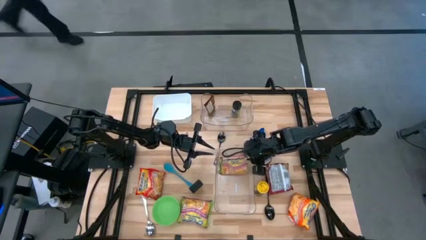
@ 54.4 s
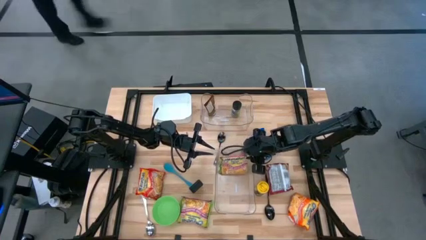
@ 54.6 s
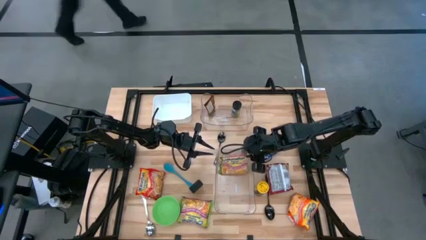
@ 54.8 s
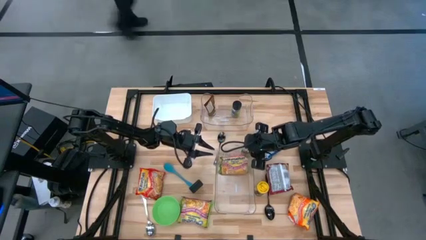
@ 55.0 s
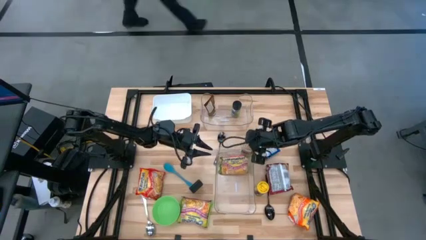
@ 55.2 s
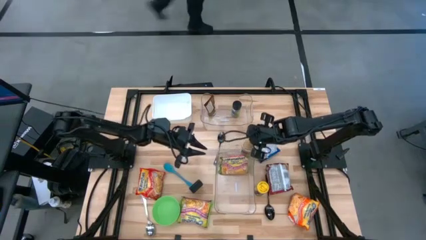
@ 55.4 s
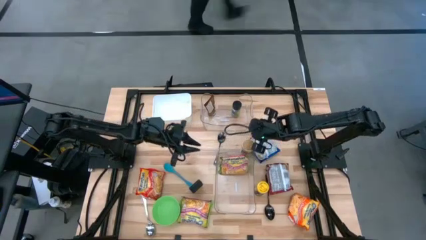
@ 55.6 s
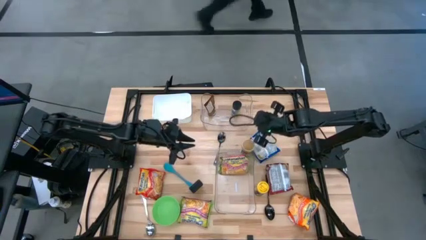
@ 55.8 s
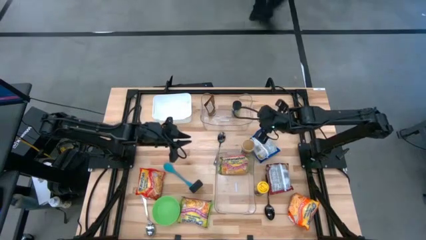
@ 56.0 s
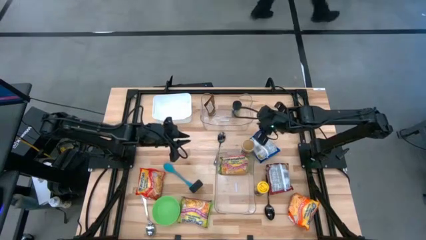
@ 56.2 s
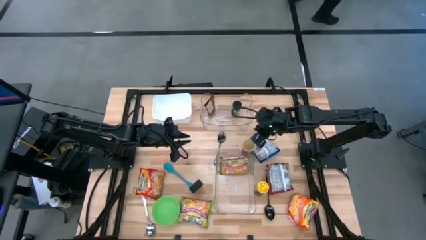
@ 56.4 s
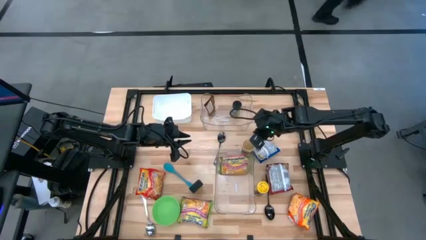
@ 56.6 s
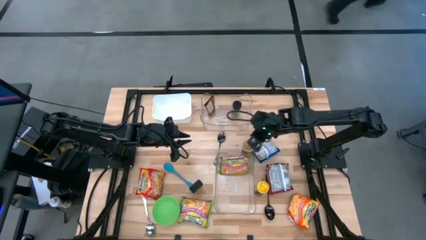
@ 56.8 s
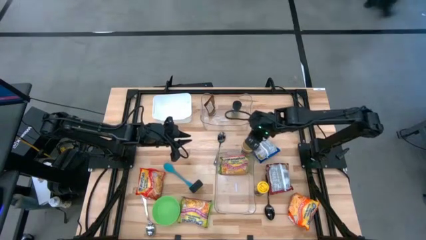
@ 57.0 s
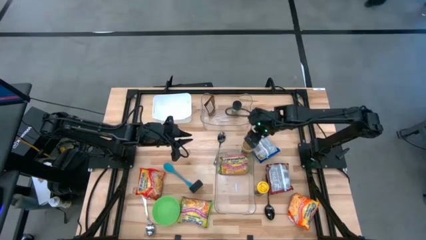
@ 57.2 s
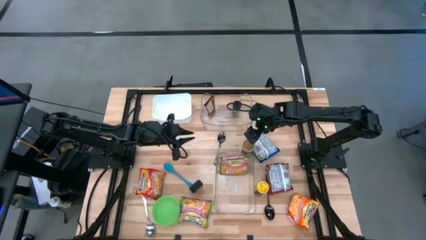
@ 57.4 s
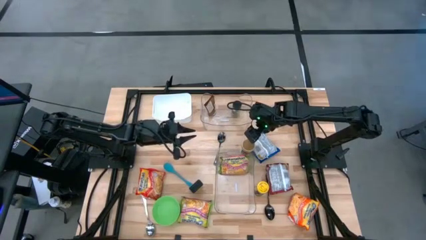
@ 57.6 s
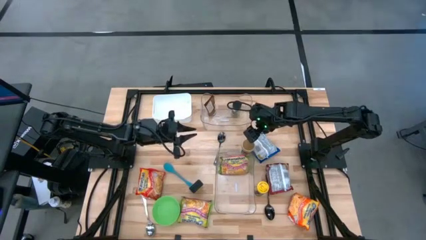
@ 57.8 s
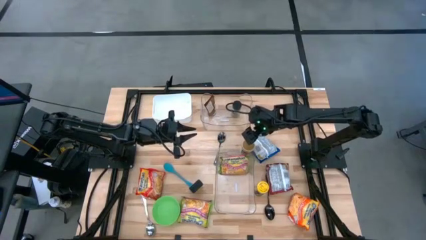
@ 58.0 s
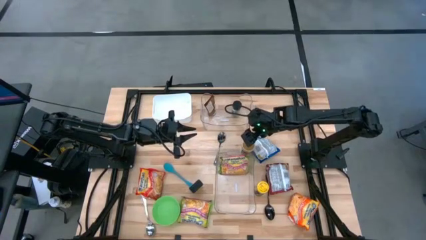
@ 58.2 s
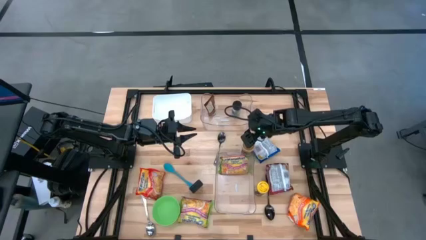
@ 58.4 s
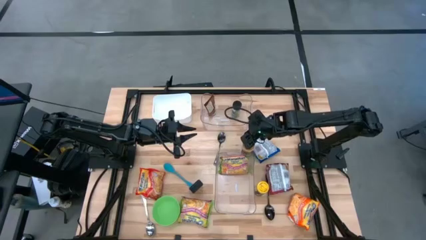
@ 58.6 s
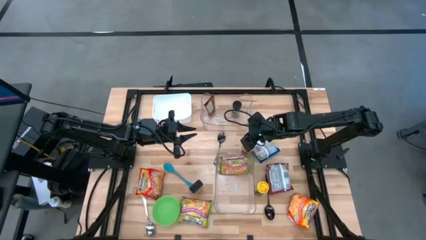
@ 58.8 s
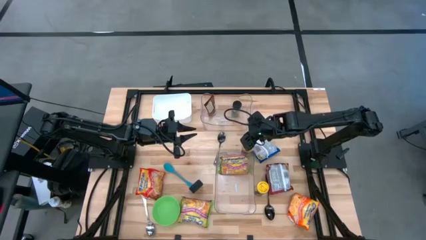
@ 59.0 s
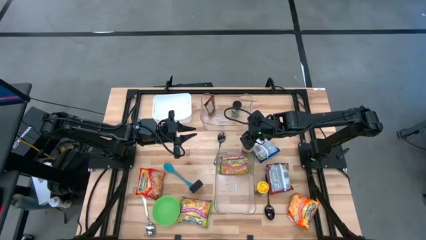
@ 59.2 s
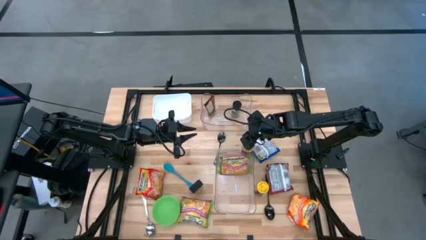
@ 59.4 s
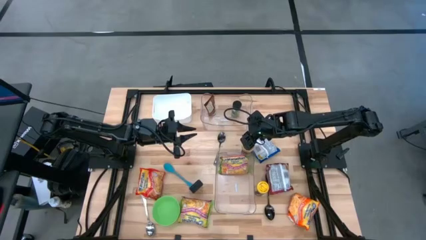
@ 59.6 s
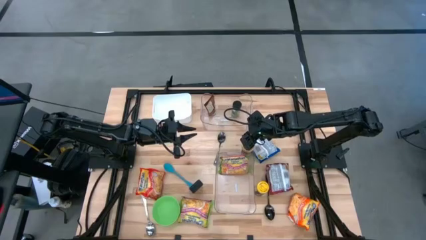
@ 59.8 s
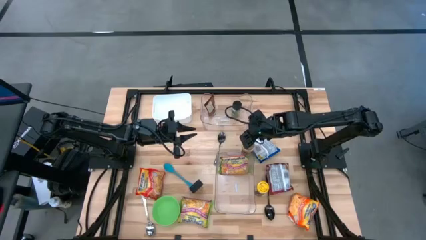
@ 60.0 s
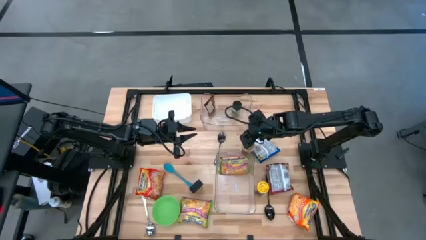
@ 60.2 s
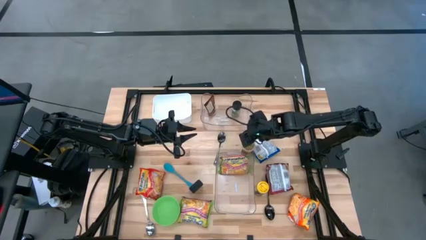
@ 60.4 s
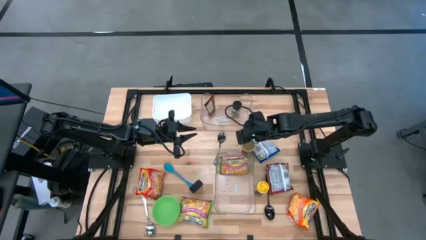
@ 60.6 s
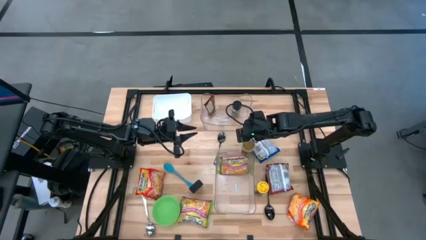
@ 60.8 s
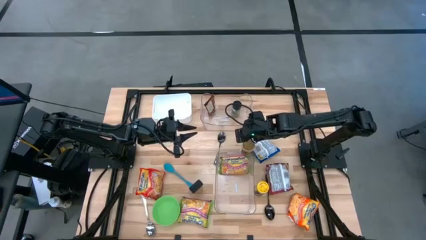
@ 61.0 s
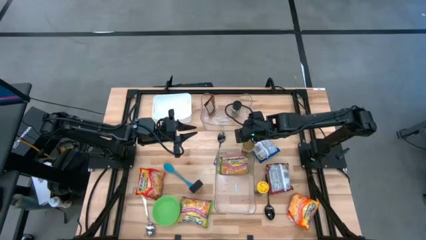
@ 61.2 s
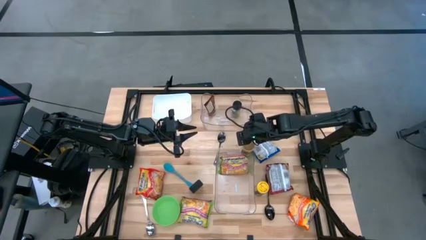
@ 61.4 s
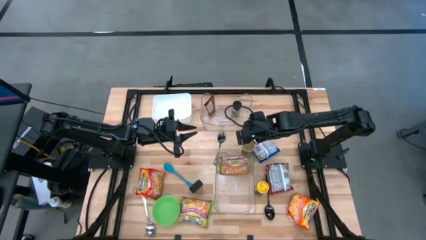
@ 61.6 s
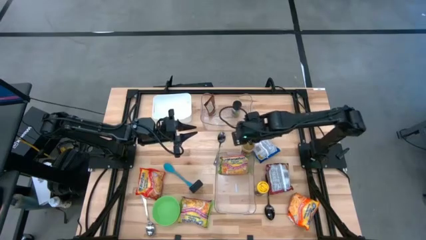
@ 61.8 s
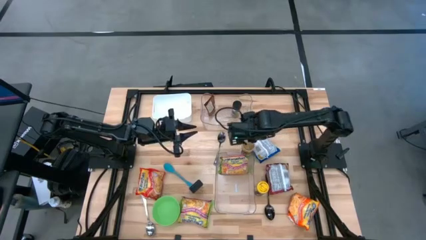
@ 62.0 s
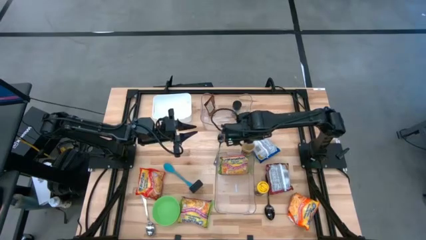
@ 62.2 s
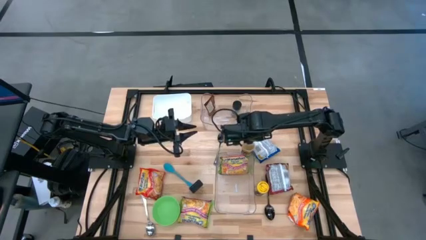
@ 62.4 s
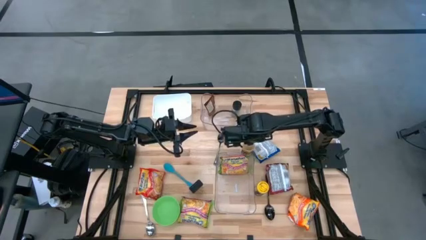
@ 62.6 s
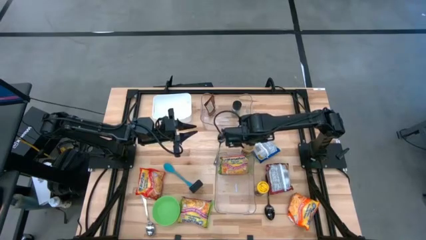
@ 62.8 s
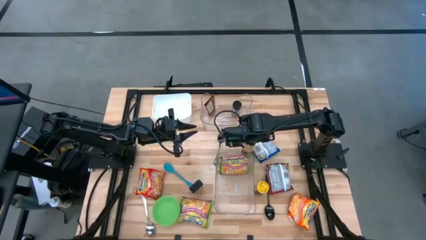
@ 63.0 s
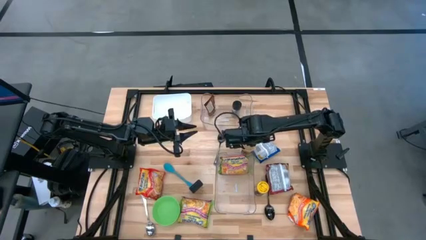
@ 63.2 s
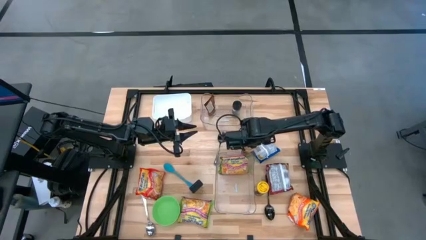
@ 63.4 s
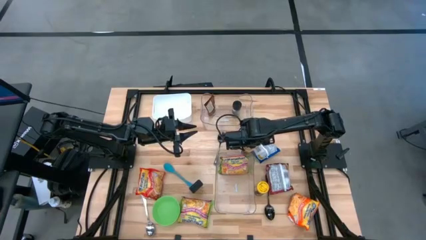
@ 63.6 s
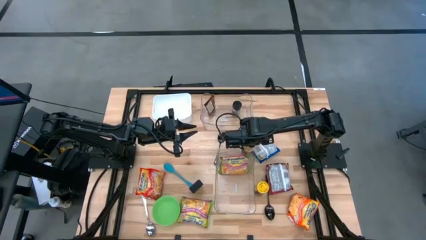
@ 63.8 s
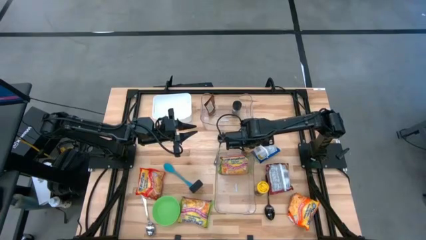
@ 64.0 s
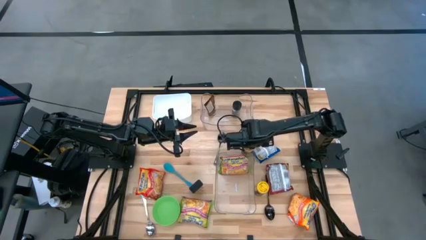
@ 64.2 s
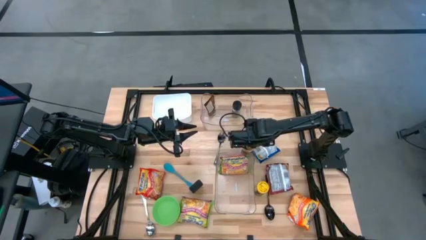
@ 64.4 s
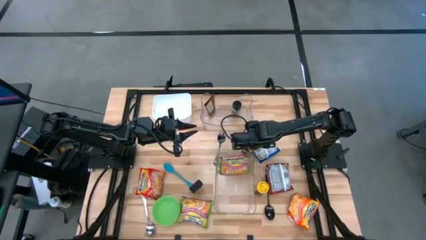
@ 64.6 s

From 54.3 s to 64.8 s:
Task: Pick & Place Food Item
Put the gold seasoning bottle into the top transparent bin
